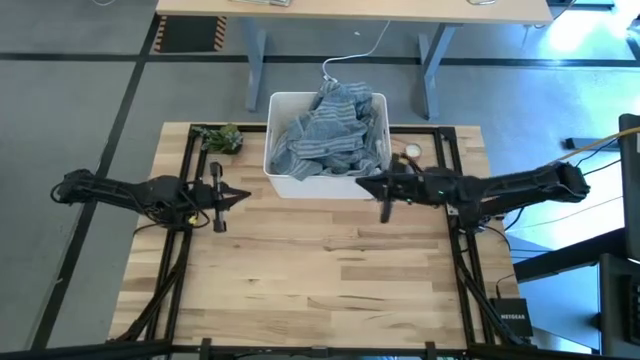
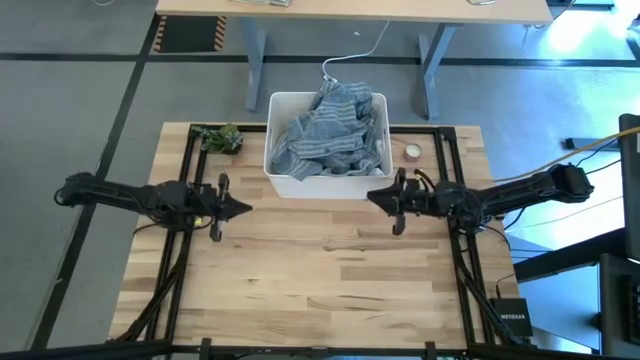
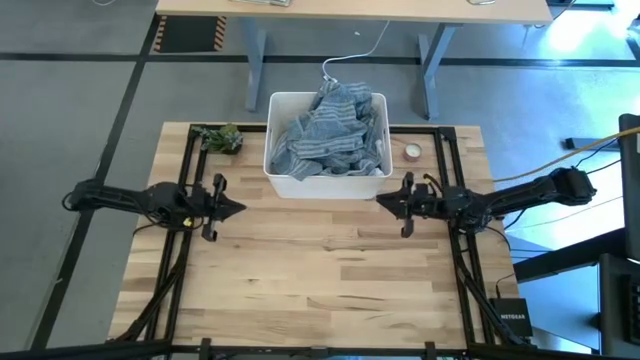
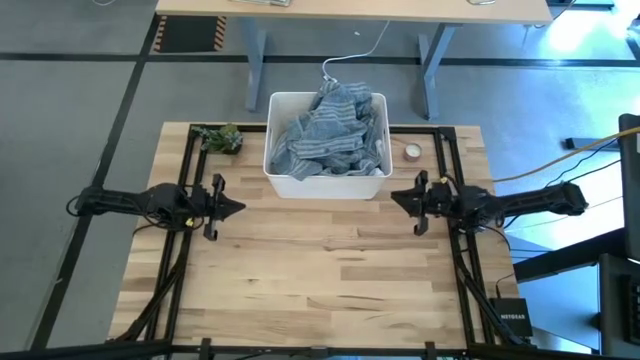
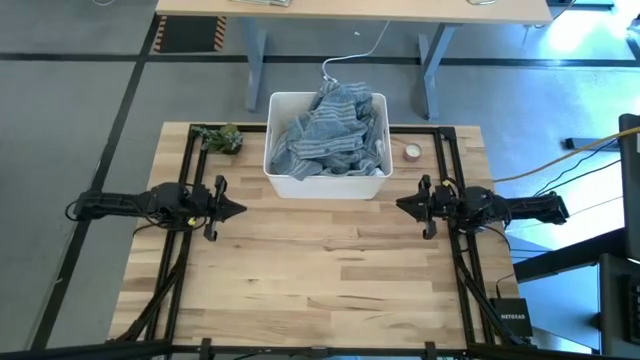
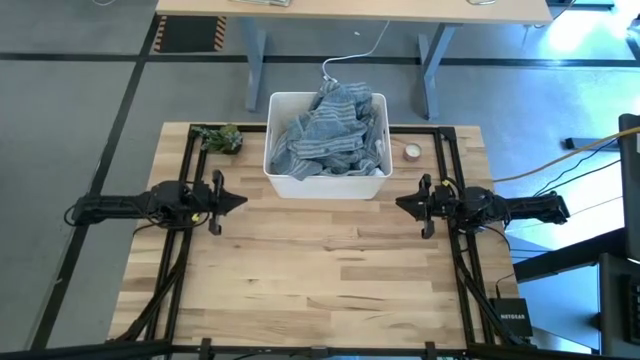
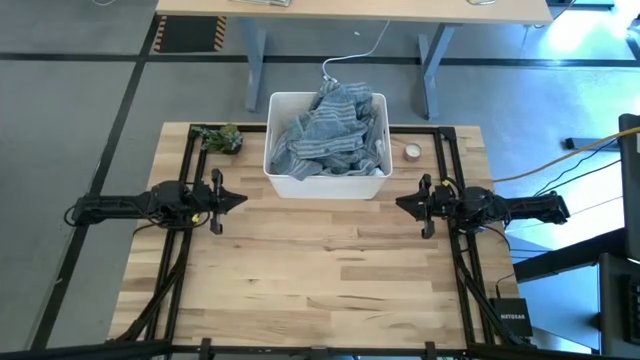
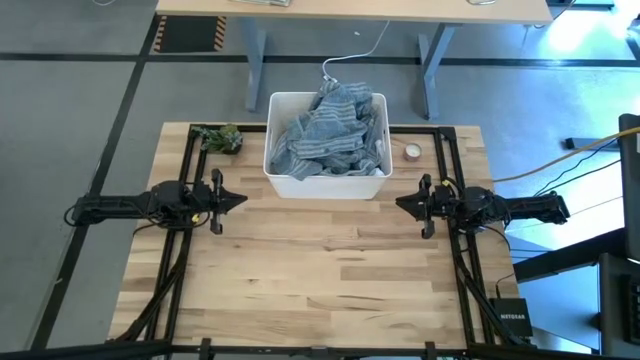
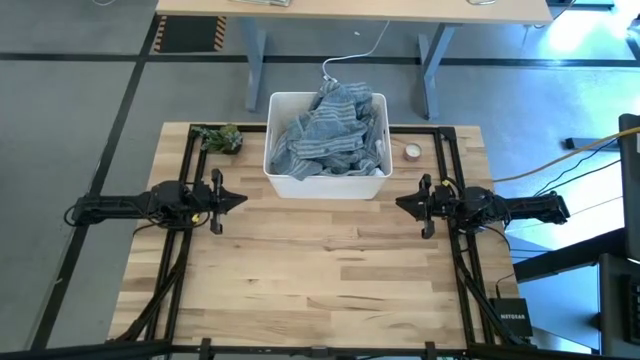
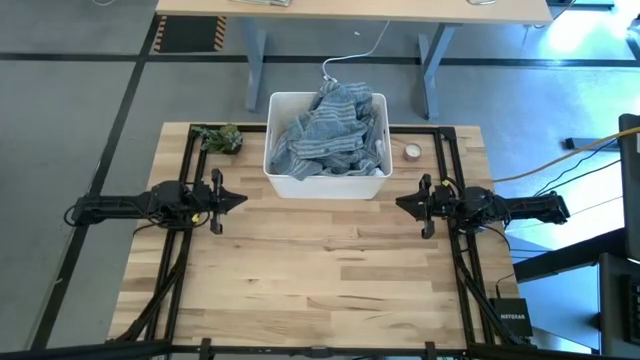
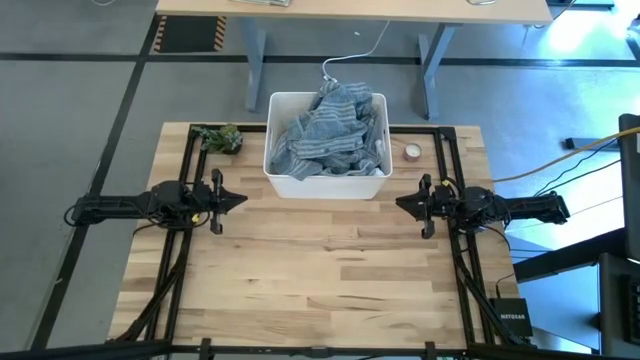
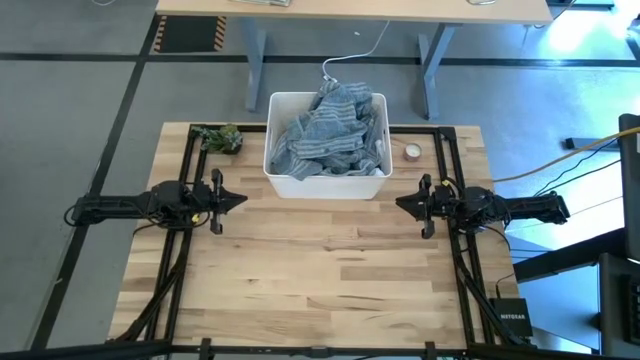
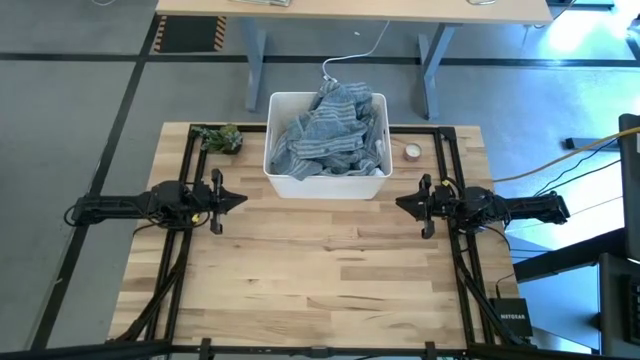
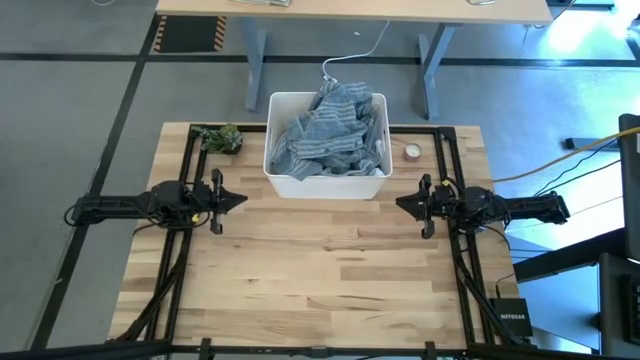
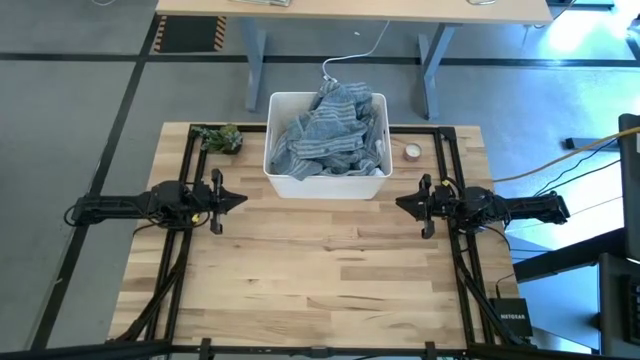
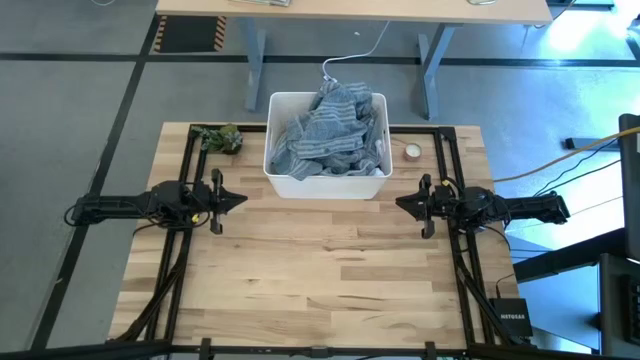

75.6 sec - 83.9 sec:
Task: Sort clothes
Return to Home Position

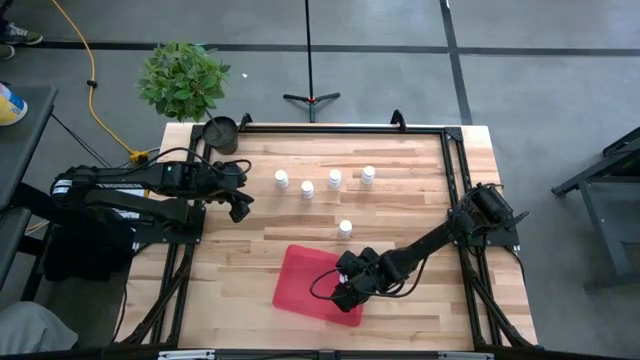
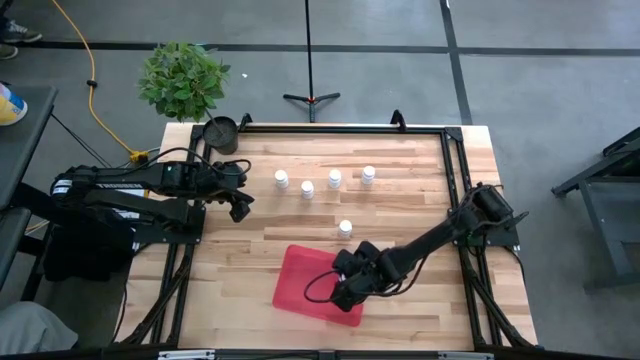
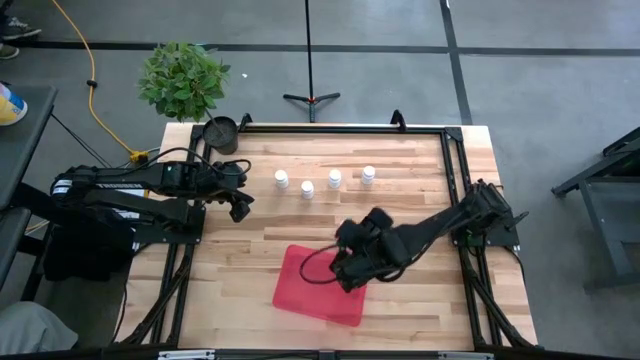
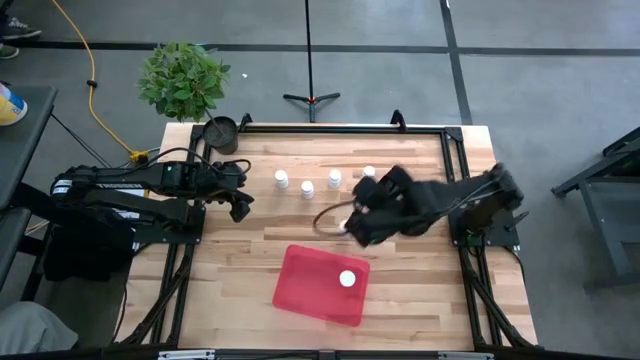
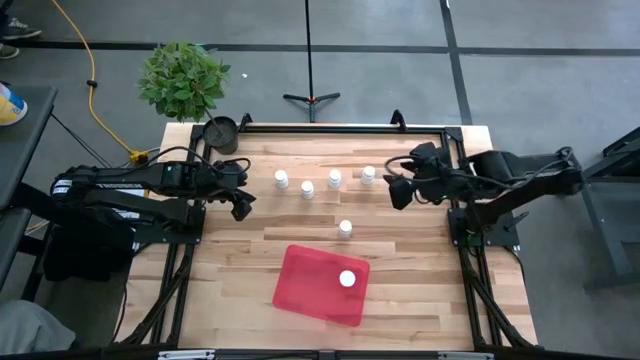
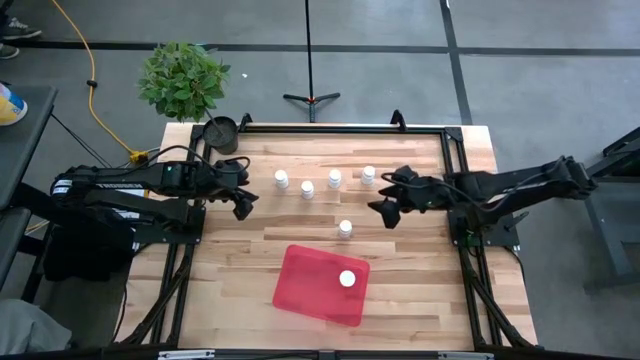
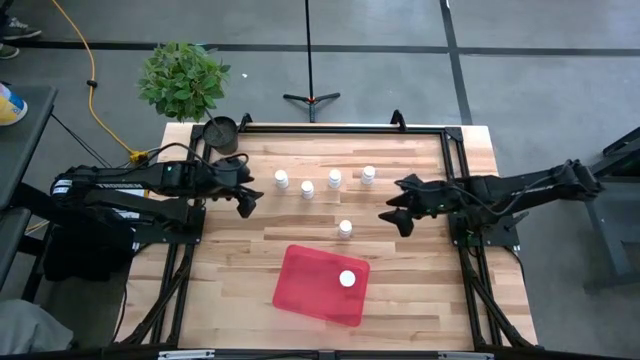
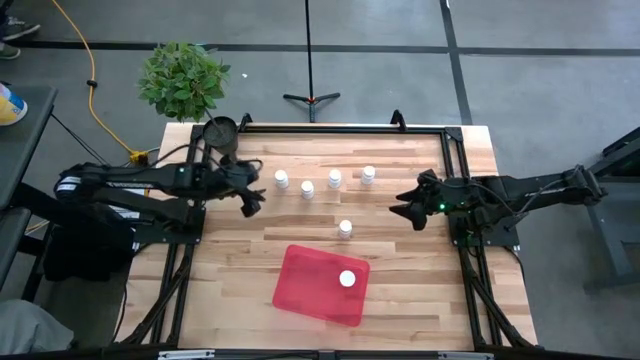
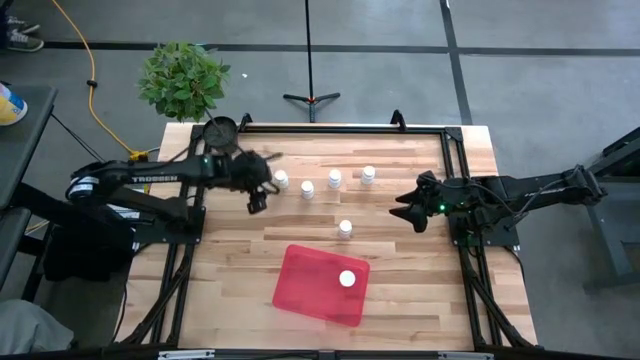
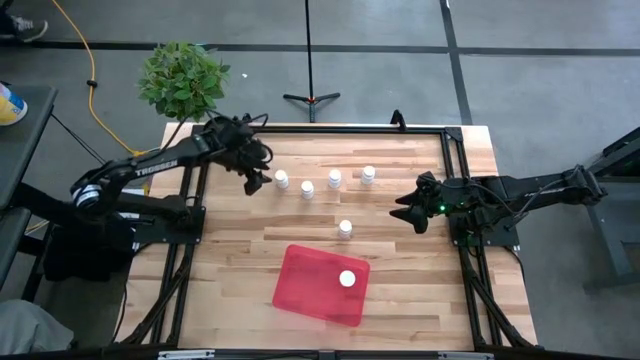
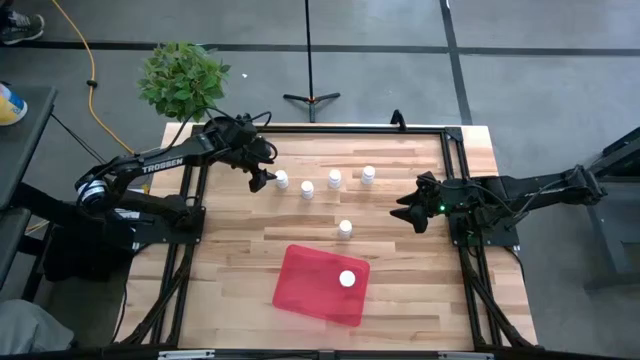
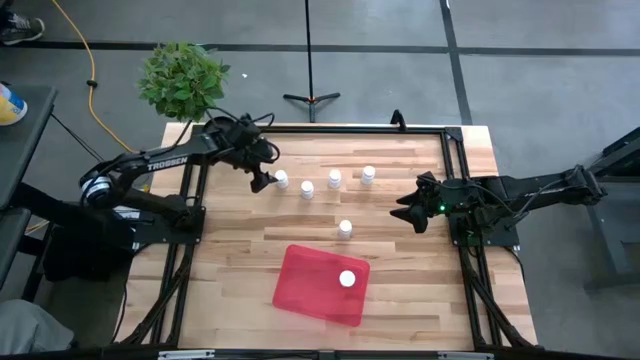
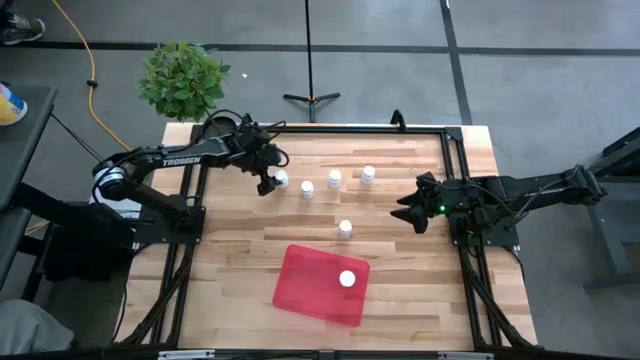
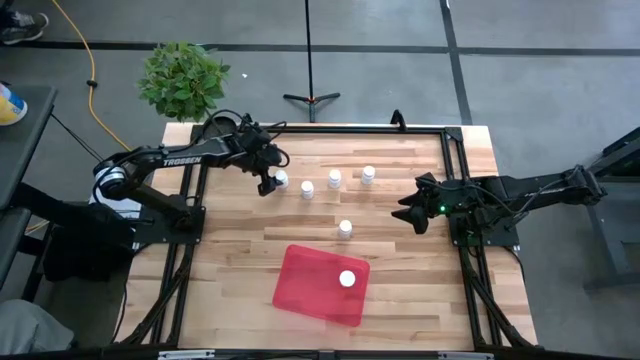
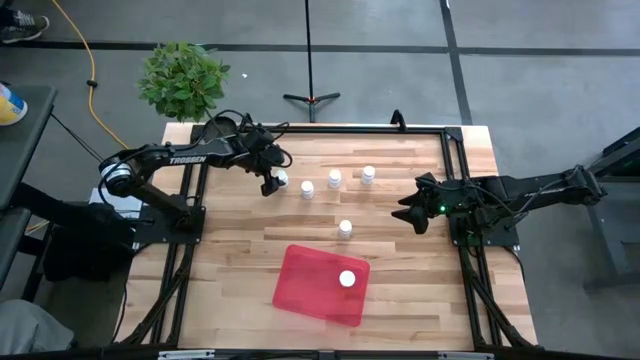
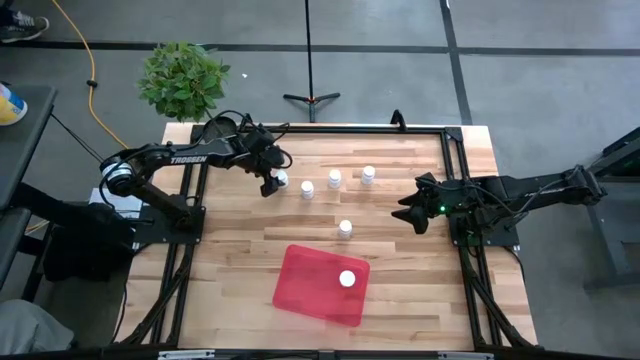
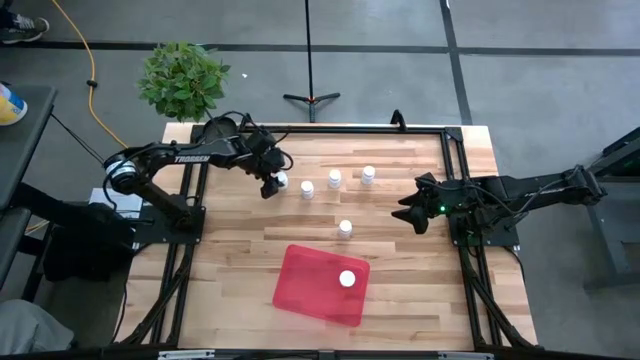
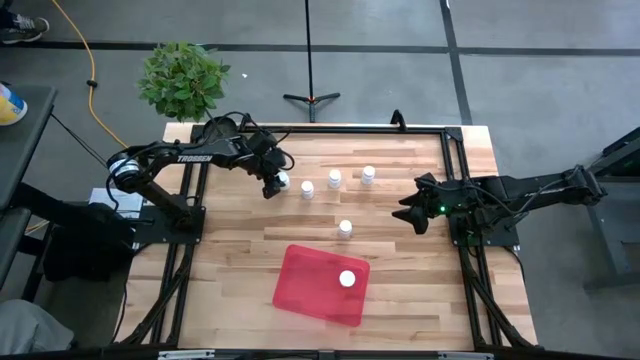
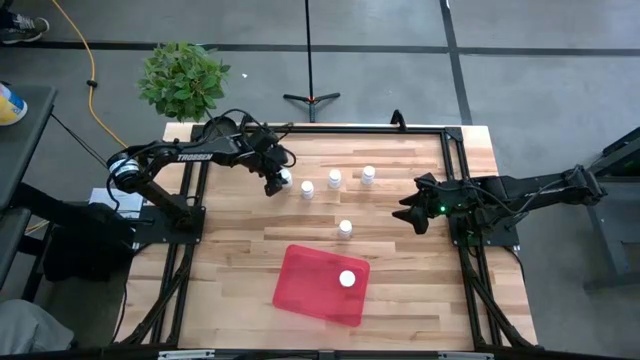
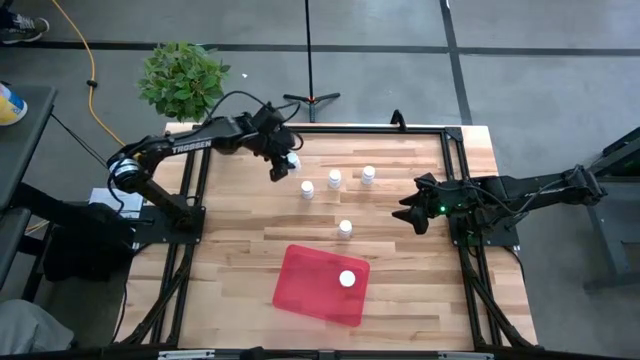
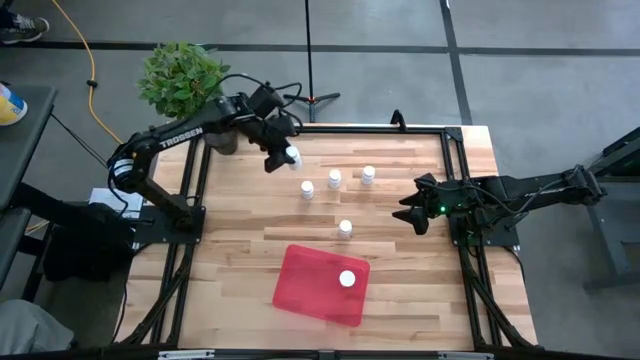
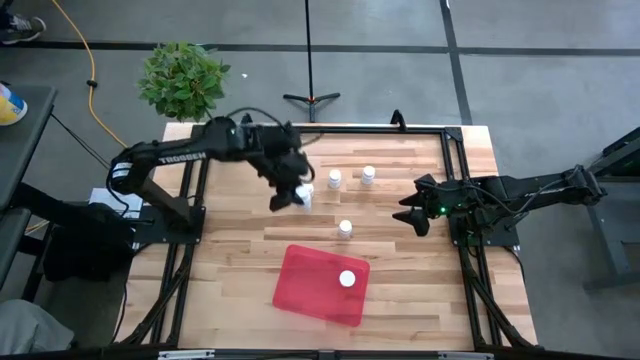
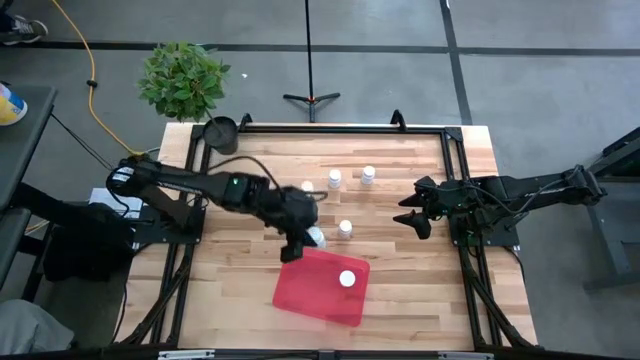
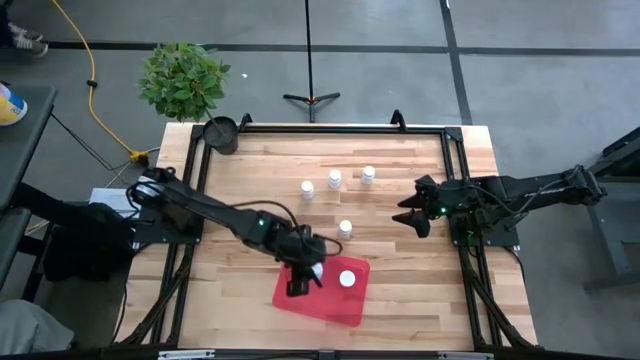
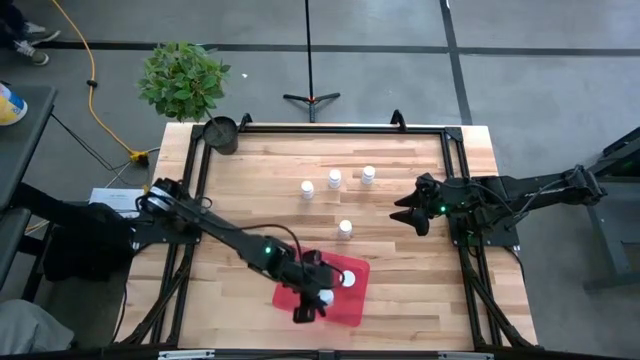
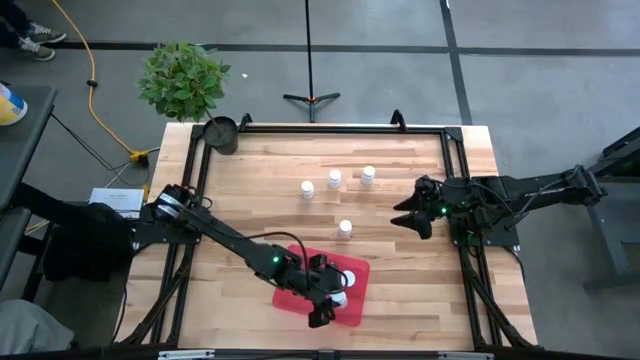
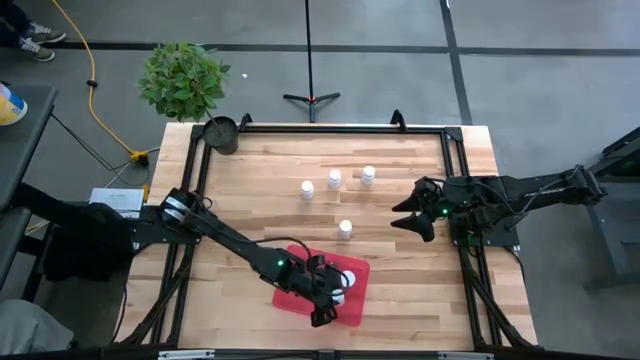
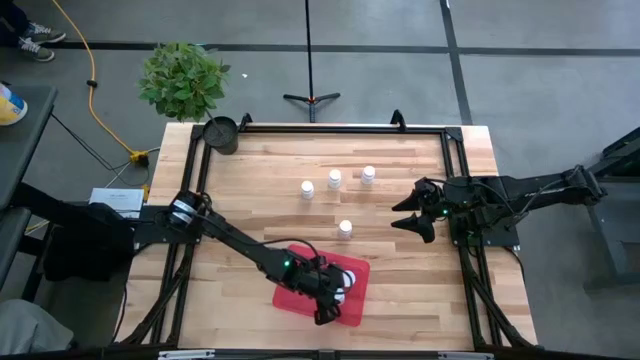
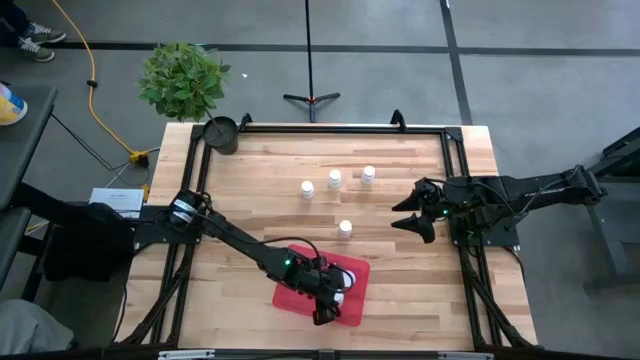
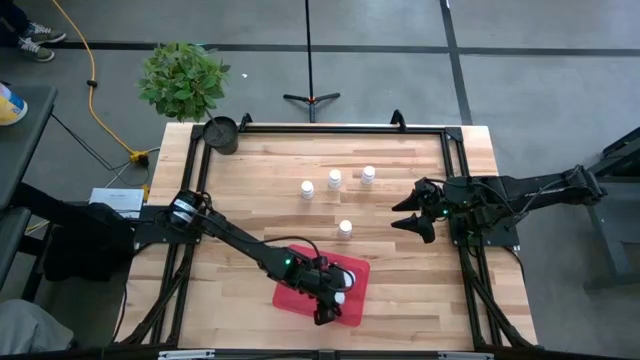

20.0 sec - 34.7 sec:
Task: Pick and place pill bottles into a basket
Put the white medicine bottle into the red container
